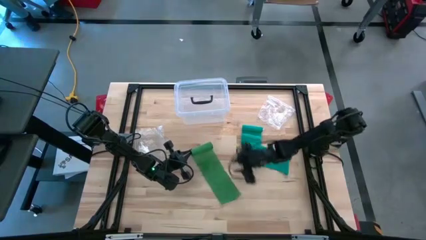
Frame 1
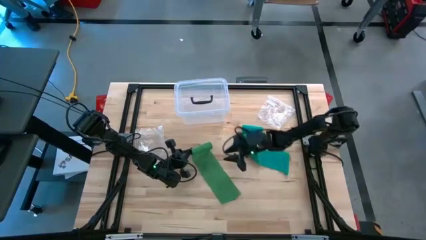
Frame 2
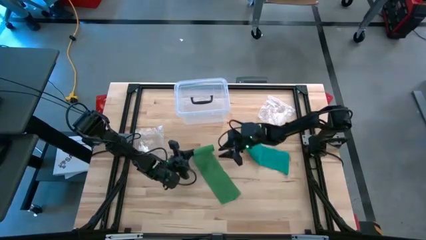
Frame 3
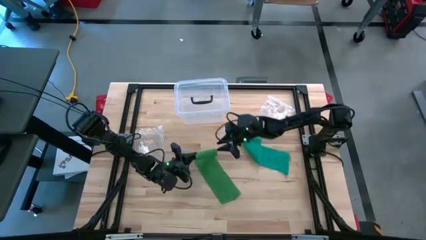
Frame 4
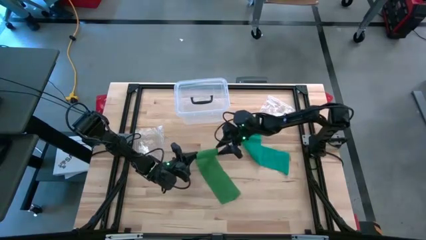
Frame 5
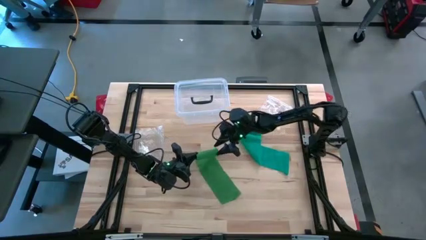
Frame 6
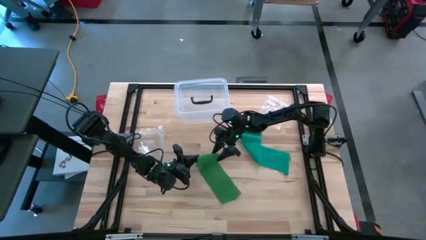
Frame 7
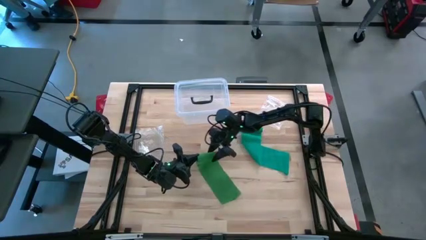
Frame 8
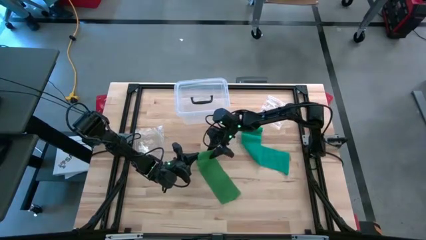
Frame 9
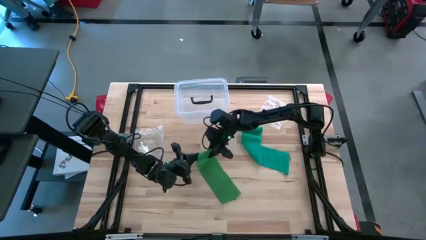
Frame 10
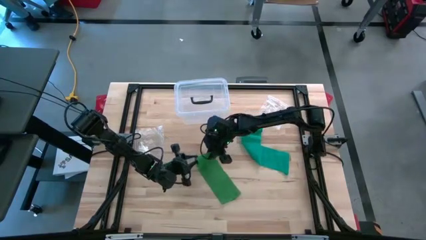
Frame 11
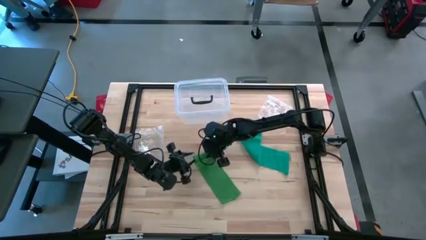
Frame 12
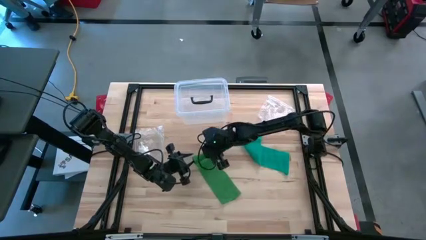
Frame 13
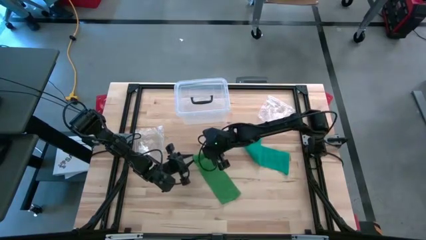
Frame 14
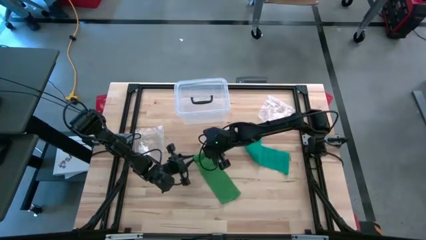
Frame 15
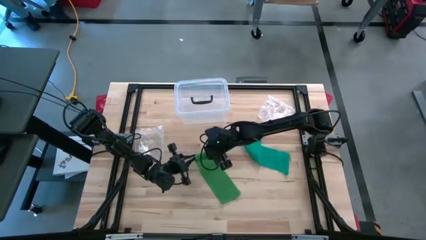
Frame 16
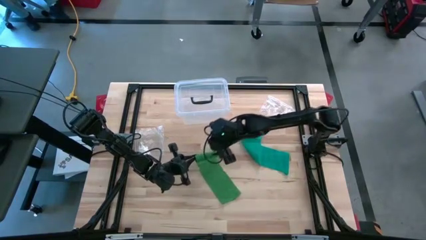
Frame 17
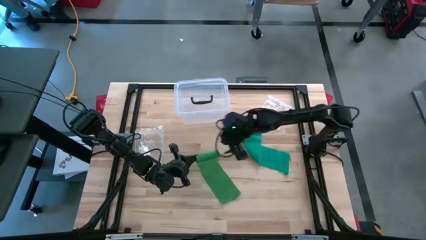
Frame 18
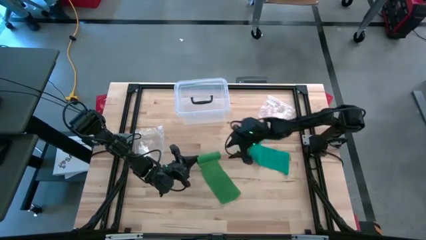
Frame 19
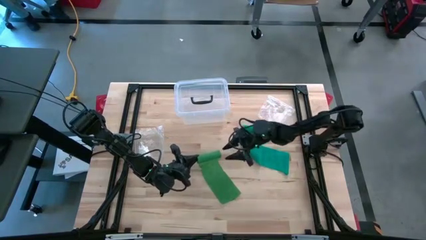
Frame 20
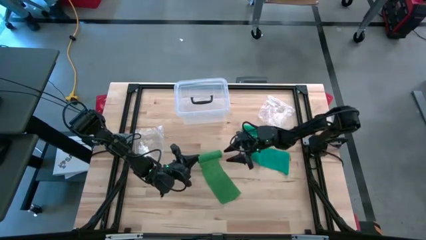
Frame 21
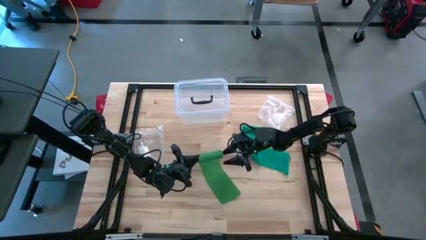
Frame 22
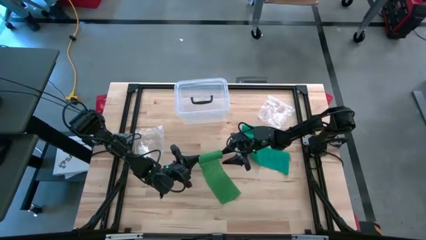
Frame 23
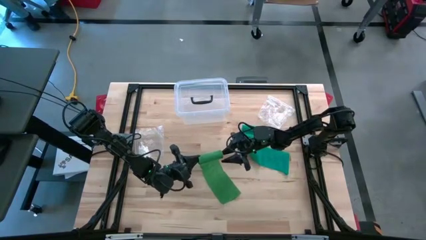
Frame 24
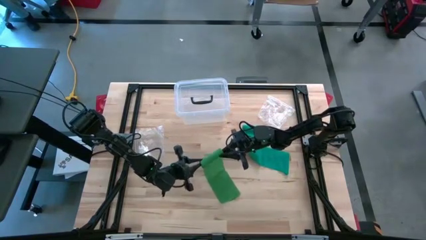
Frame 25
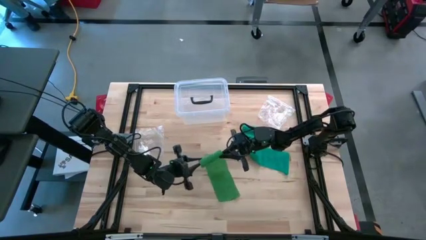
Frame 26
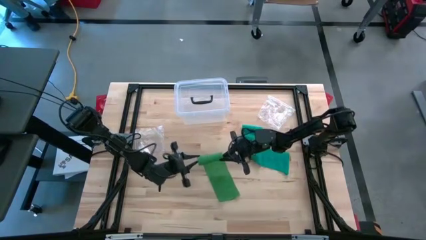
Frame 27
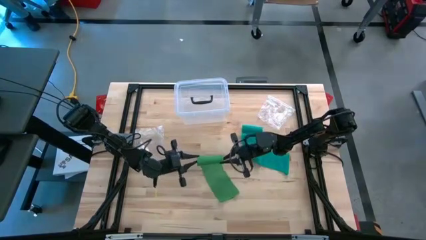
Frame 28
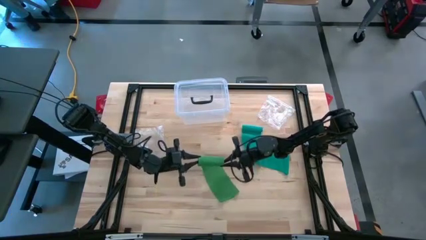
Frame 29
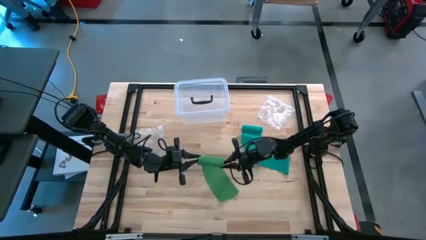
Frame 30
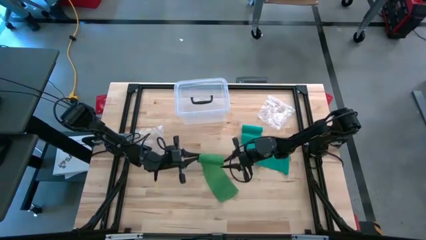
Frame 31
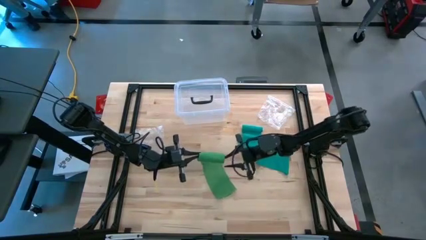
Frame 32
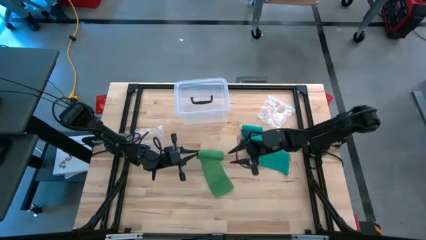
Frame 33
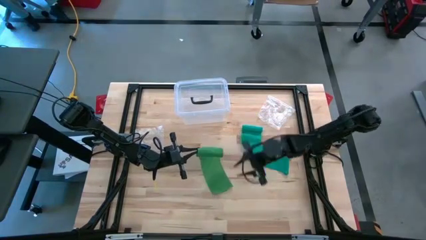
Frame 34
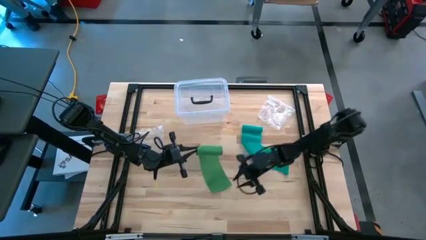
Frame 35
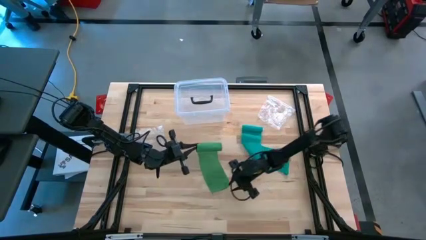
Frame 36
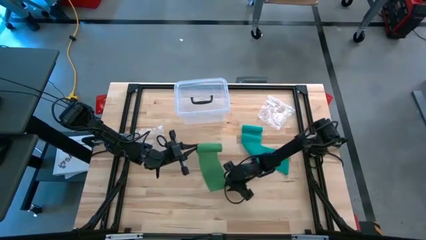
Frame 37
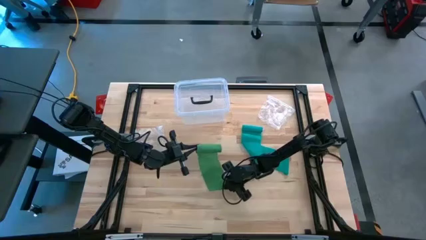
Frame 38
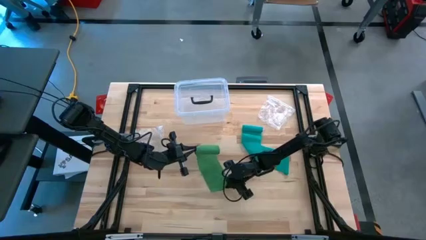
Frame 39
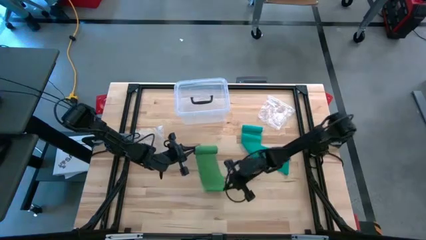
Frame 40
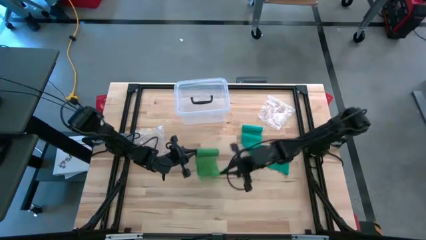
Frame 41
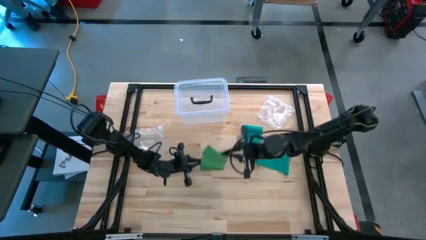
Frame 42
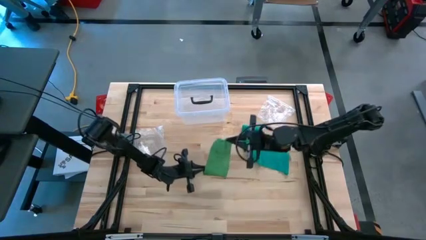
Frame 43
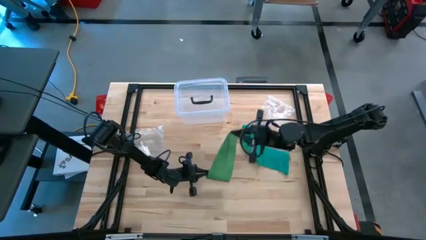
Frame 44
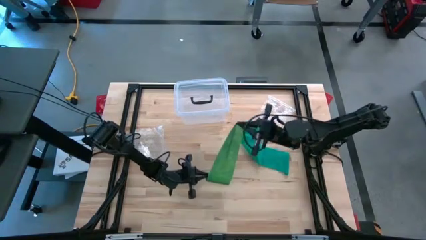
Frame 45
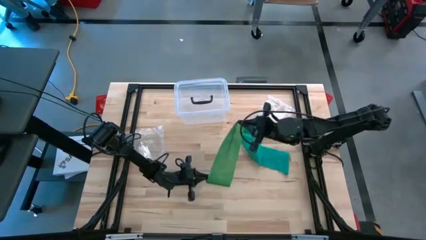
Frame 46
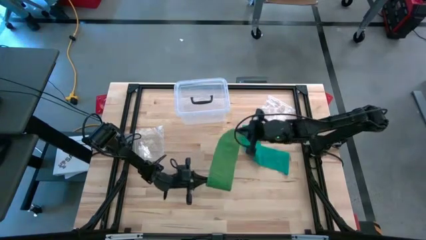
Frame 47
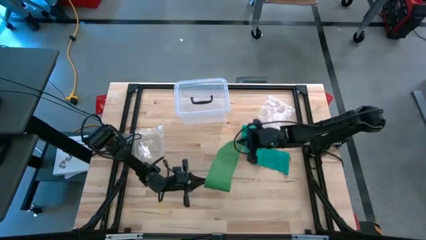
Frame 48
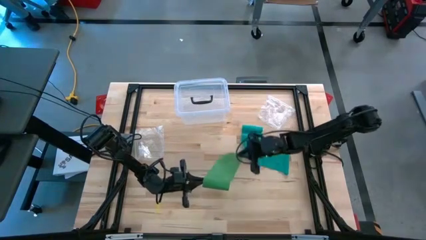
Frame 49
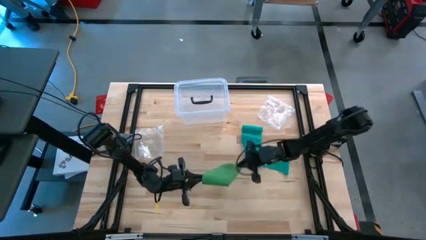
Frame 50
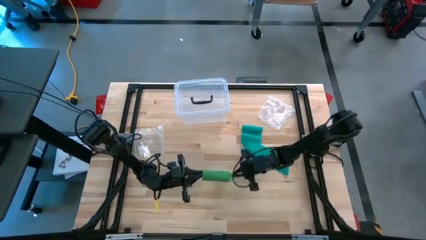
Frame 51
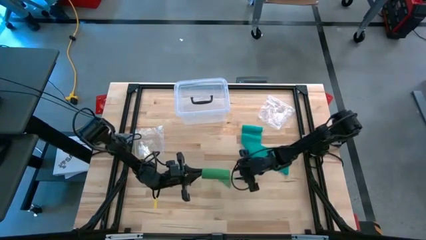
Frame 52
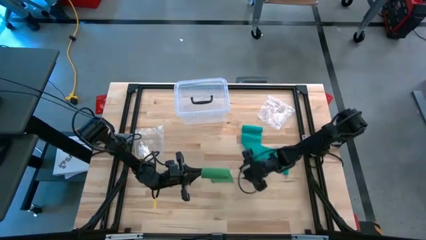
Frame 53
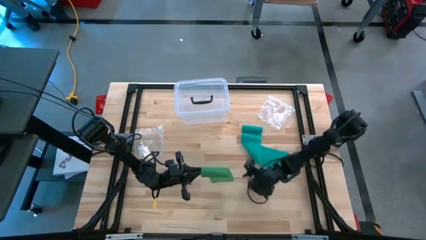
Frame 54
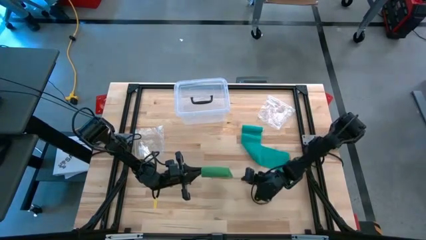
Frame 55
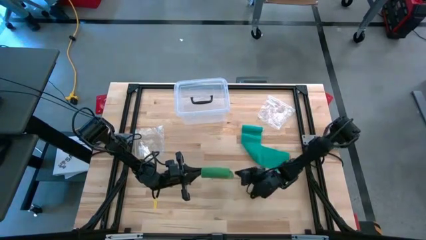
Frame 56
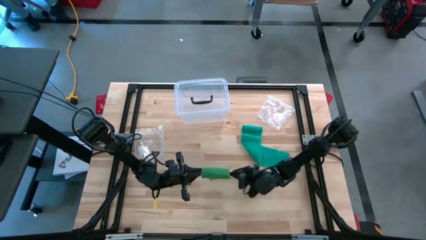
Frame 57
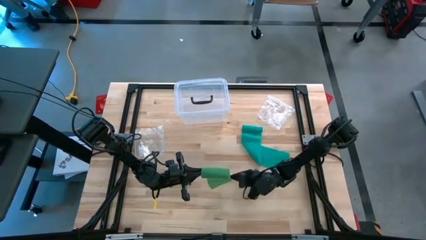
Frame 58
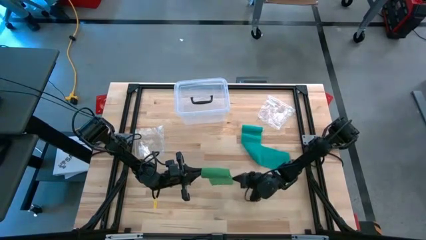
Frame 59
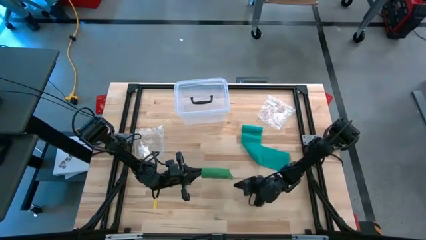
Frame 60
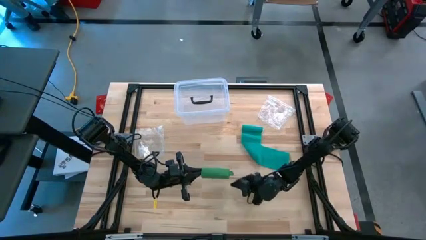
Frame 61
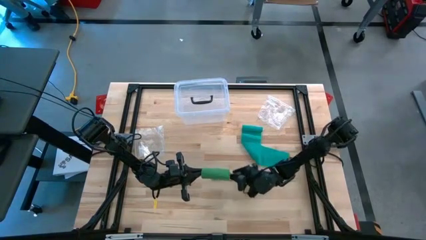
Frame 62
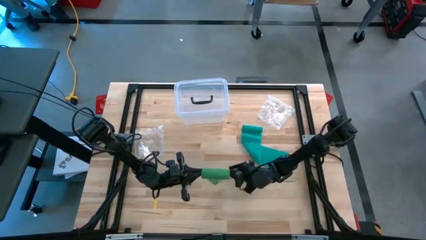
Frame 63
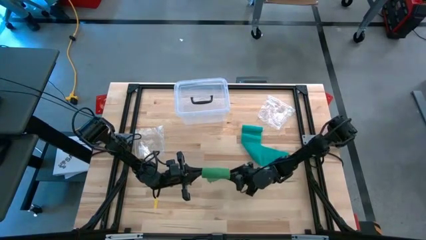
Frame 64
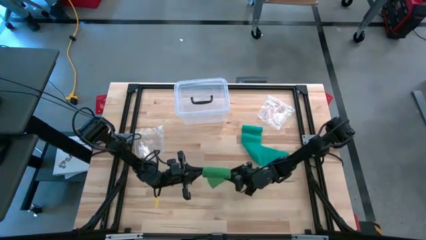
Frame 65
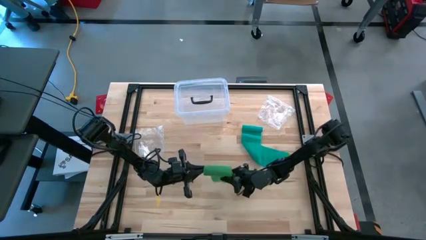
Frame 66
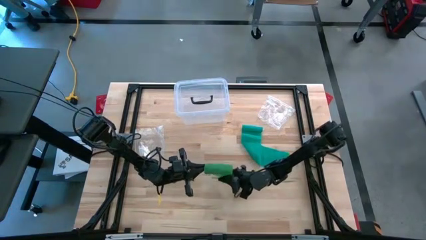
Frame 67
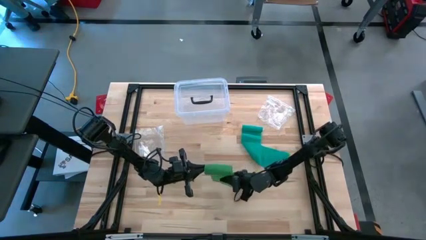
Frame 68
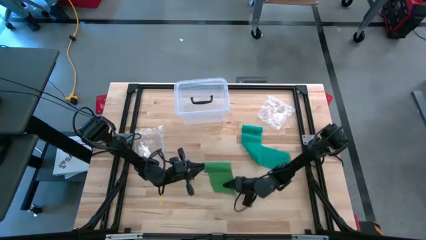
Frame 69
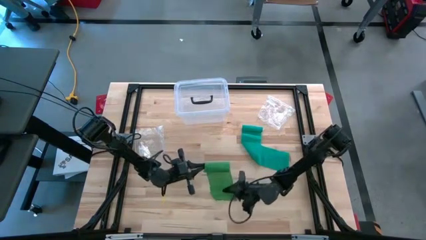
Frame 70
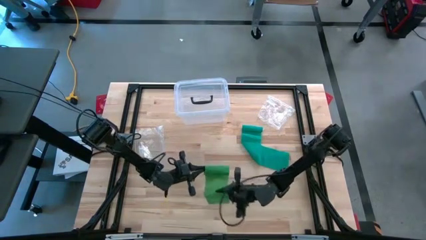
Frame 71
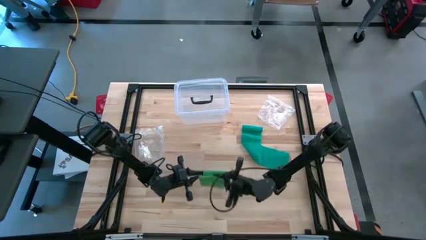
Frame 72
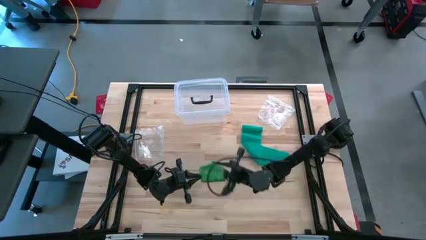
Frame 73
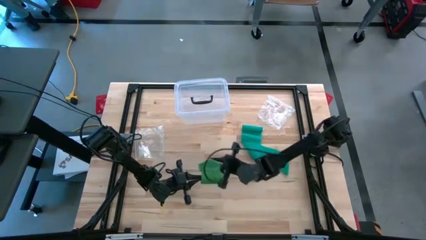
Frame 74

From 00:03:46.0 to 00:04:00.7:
Task: Roll bandage
Roll the green bandage
